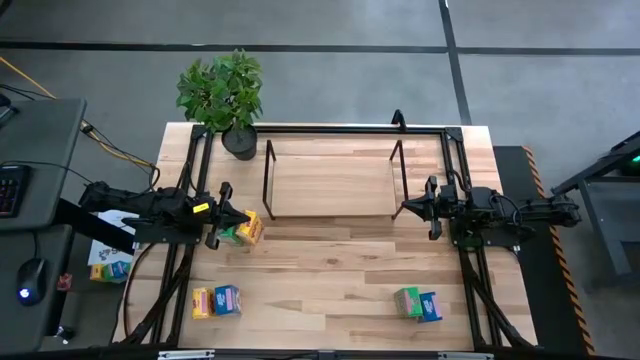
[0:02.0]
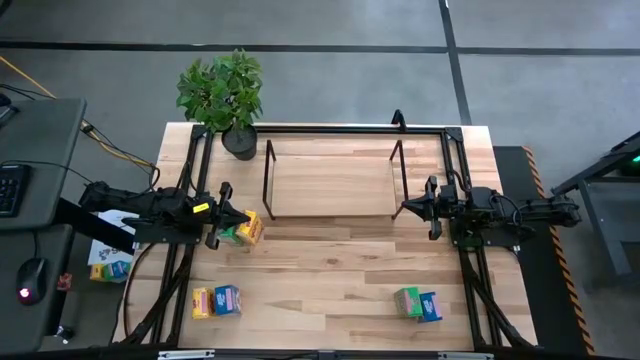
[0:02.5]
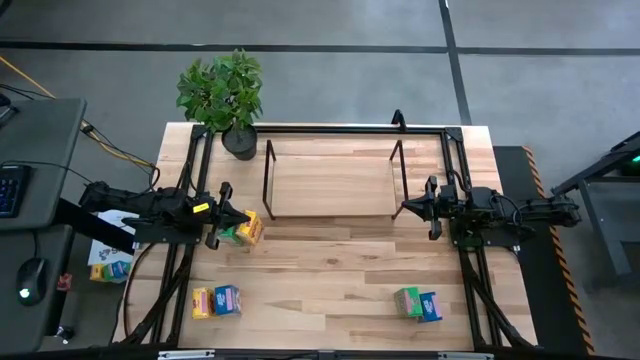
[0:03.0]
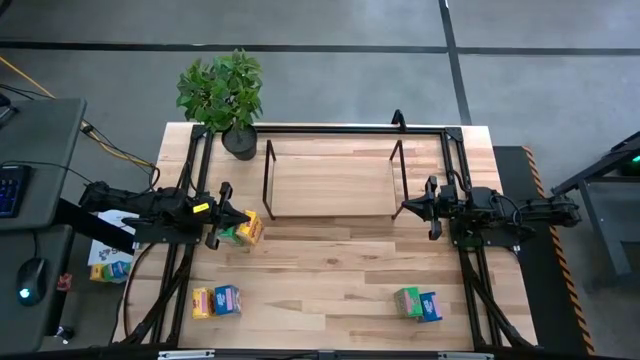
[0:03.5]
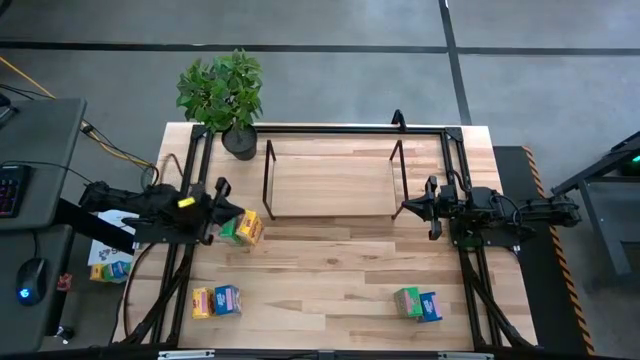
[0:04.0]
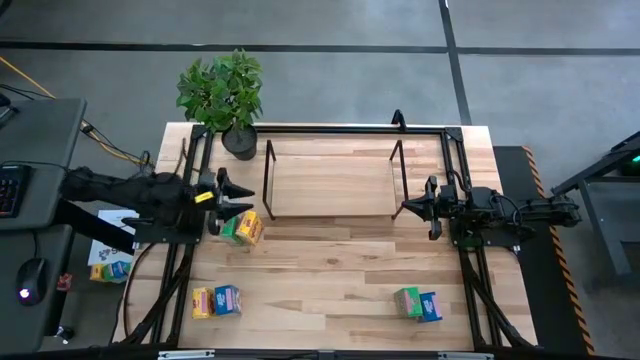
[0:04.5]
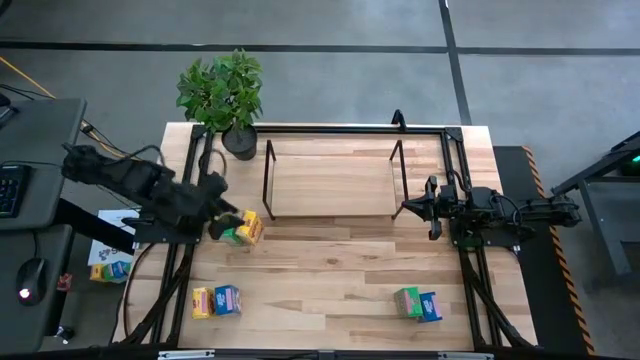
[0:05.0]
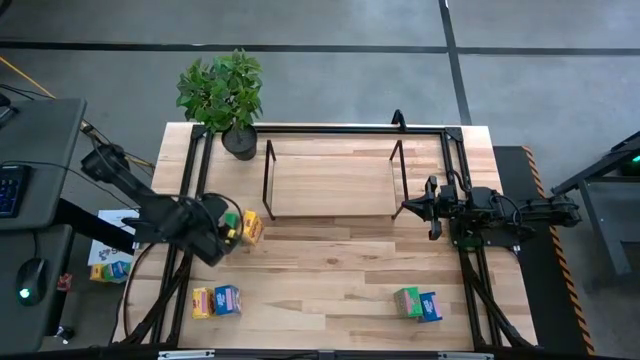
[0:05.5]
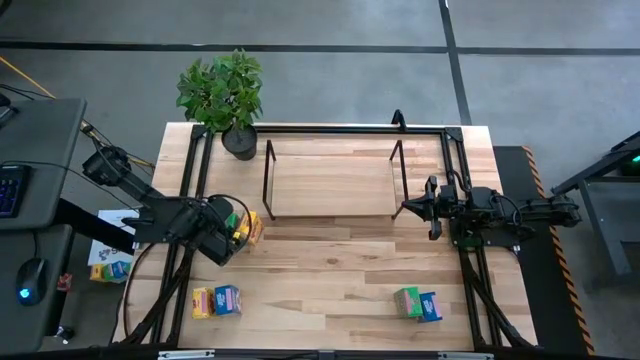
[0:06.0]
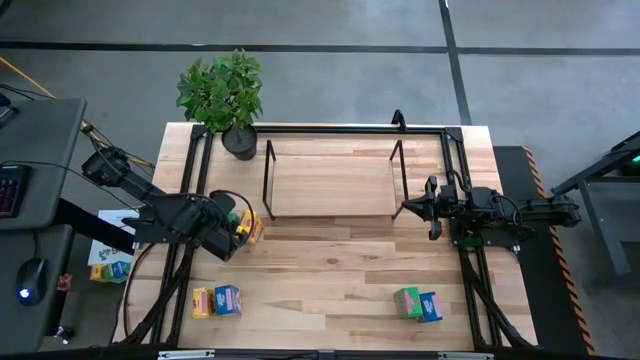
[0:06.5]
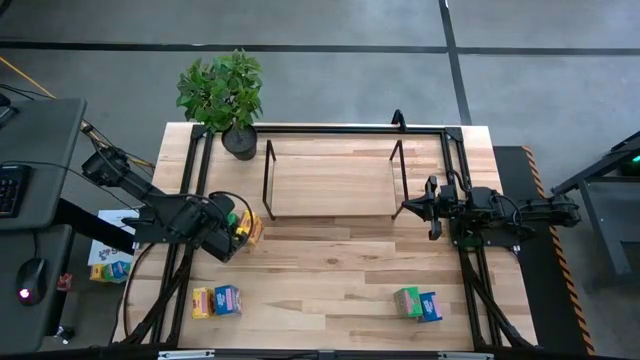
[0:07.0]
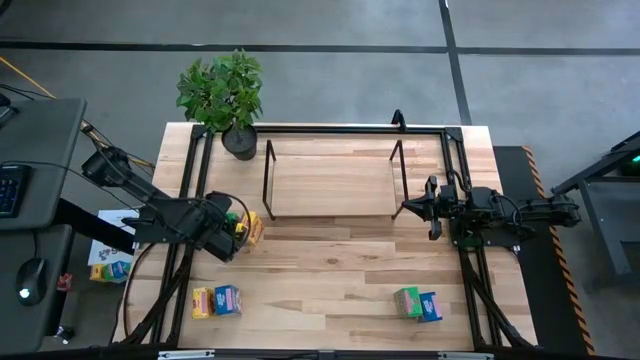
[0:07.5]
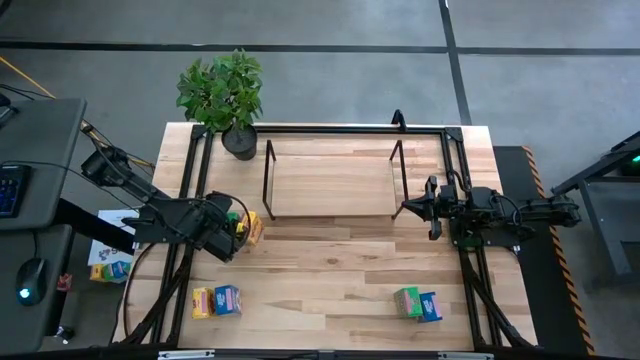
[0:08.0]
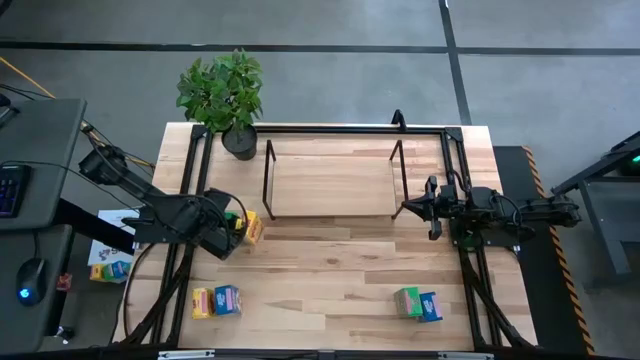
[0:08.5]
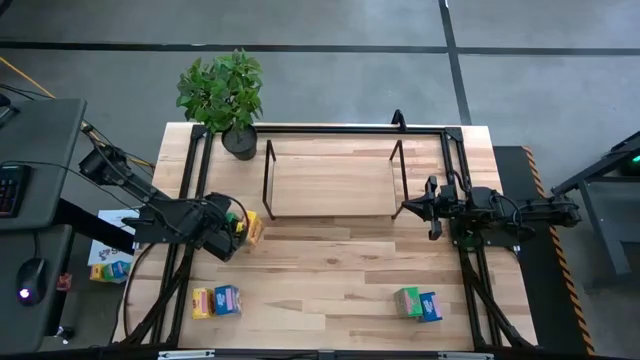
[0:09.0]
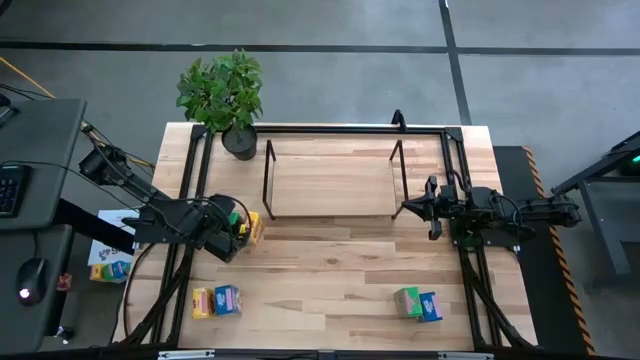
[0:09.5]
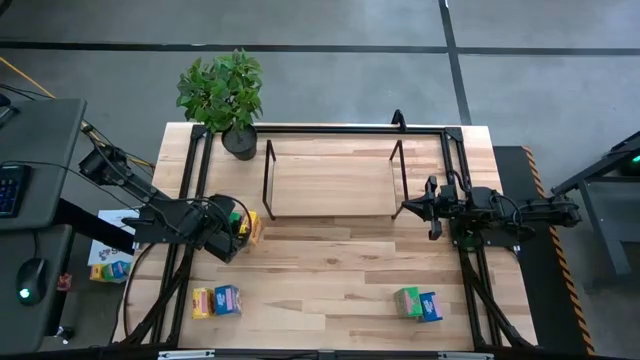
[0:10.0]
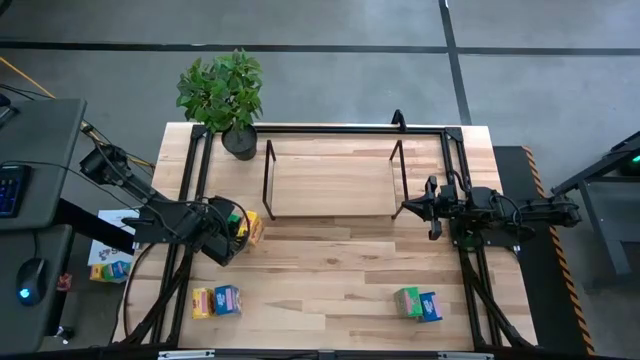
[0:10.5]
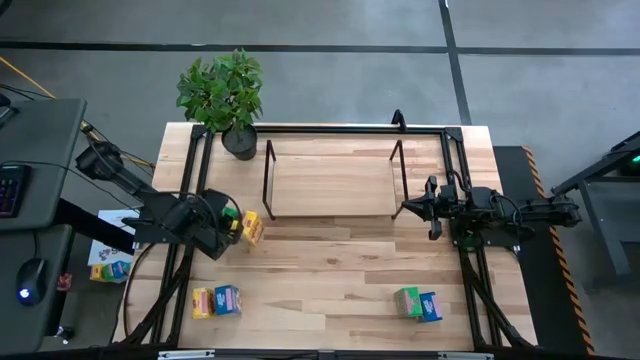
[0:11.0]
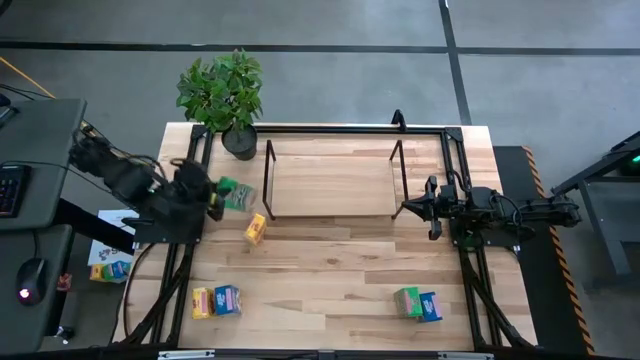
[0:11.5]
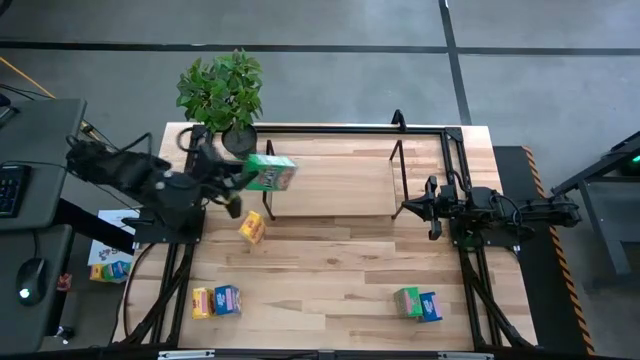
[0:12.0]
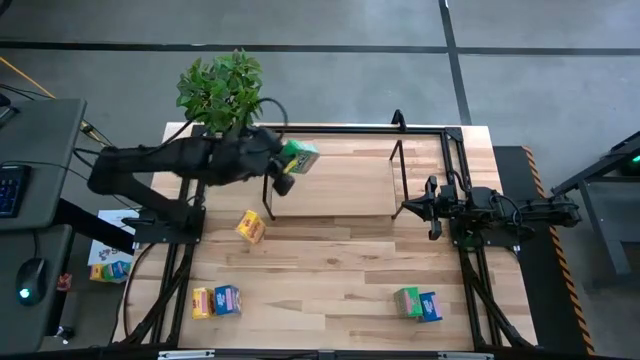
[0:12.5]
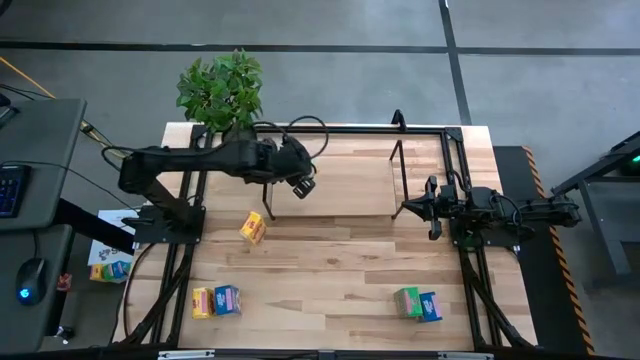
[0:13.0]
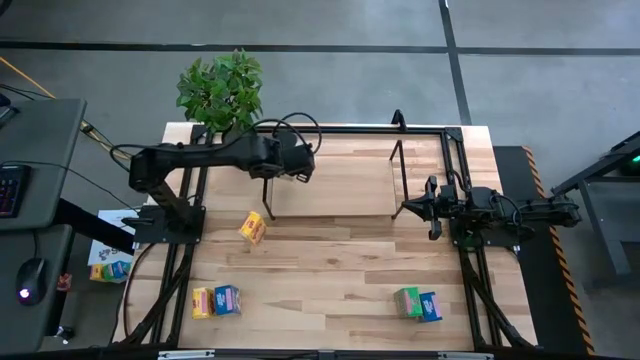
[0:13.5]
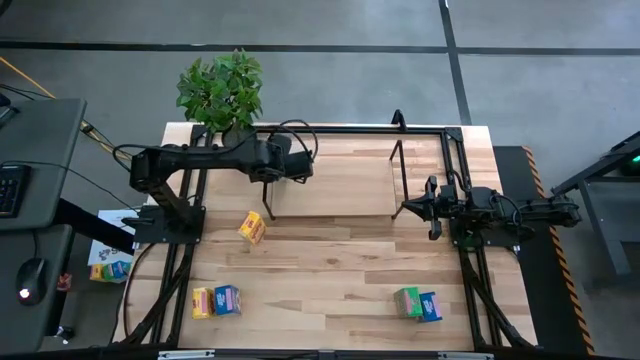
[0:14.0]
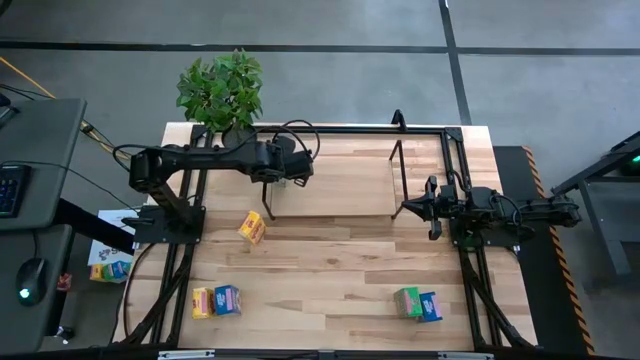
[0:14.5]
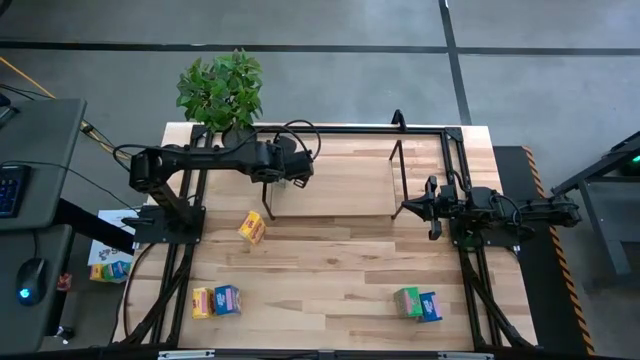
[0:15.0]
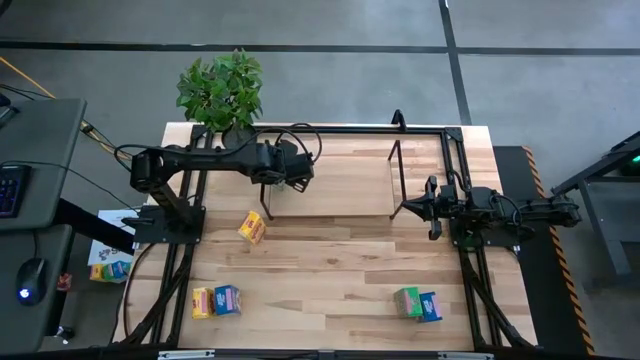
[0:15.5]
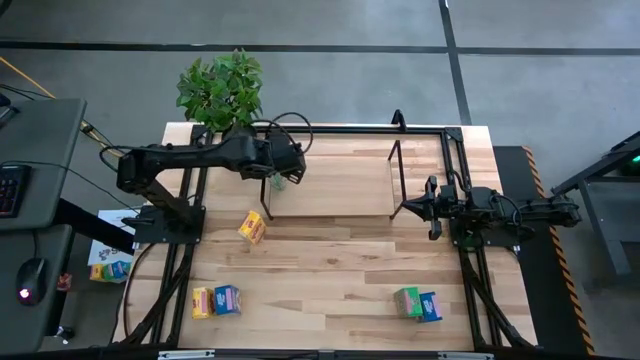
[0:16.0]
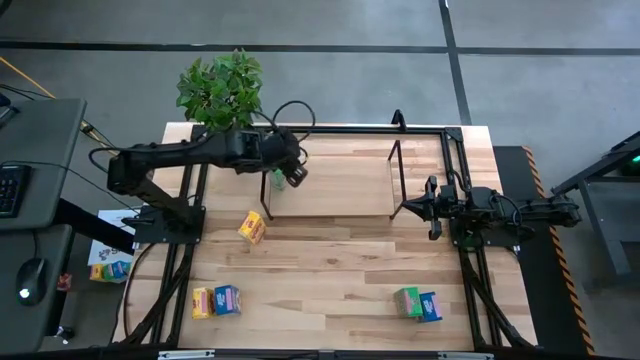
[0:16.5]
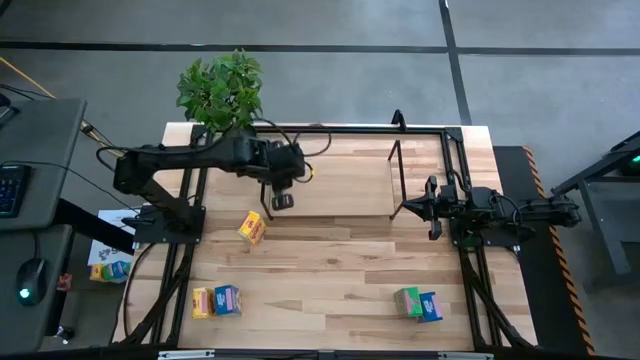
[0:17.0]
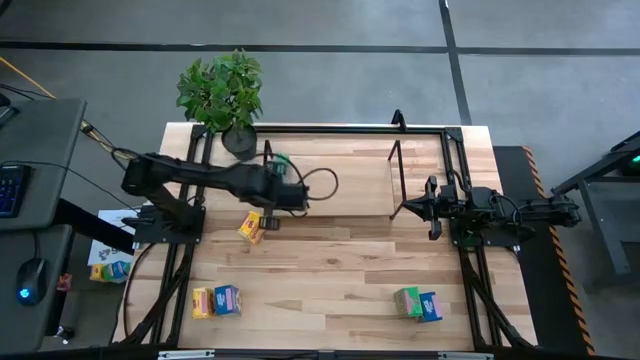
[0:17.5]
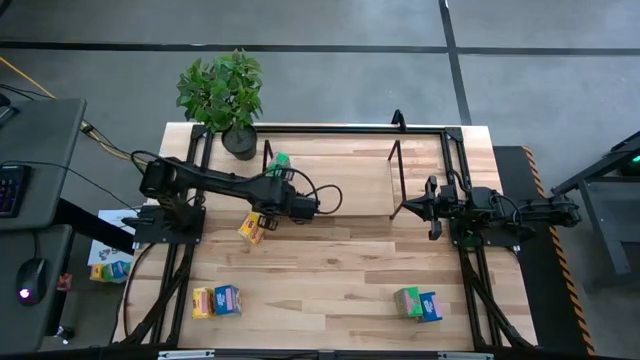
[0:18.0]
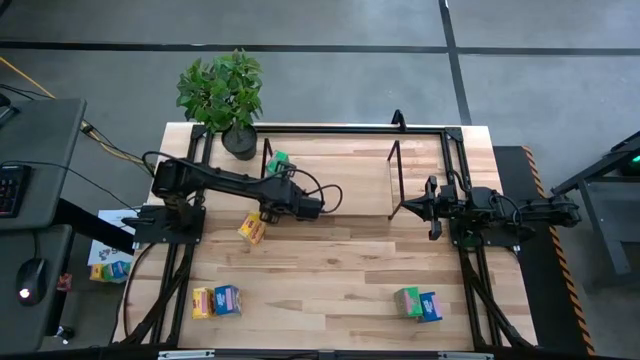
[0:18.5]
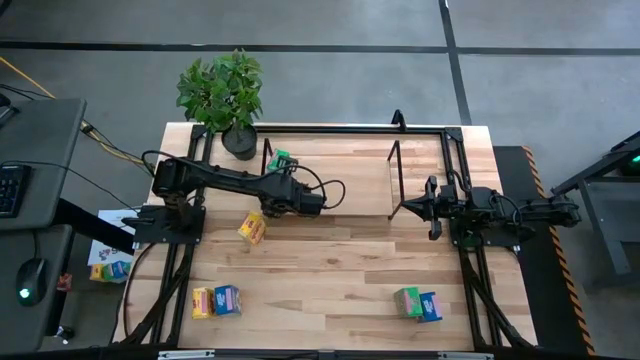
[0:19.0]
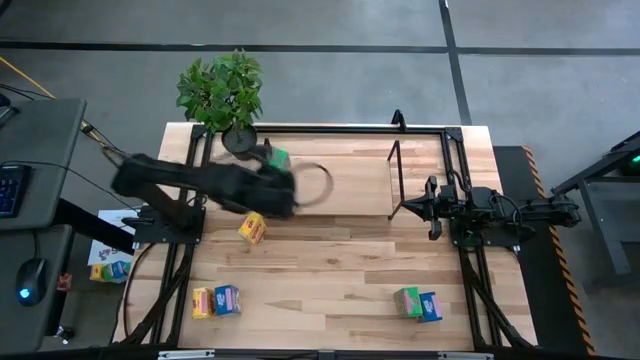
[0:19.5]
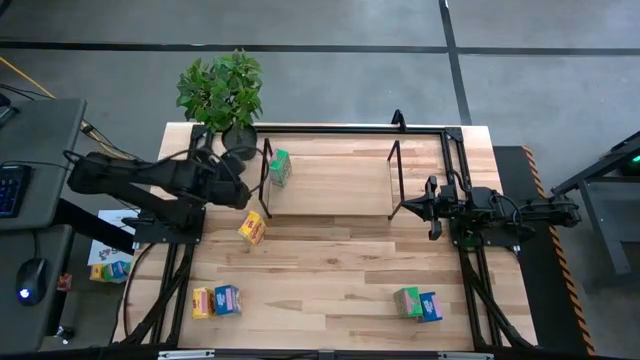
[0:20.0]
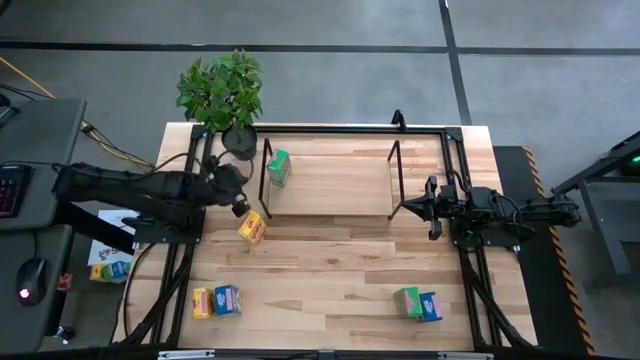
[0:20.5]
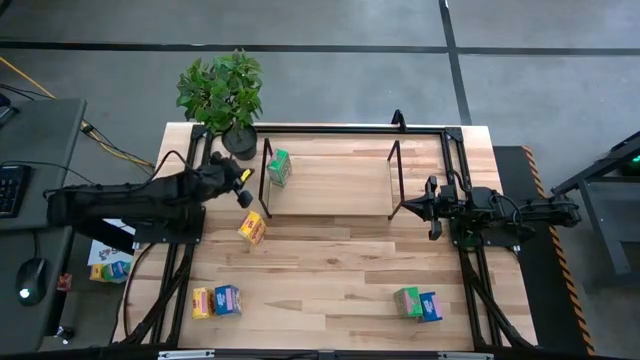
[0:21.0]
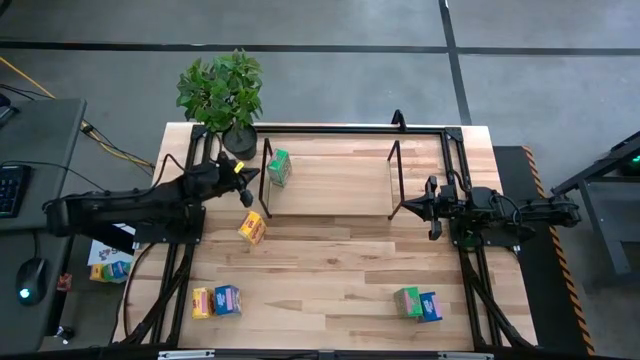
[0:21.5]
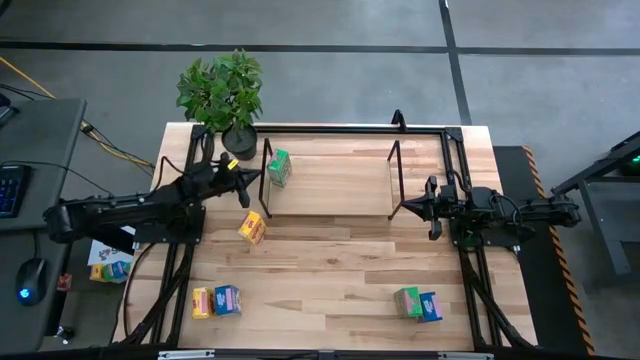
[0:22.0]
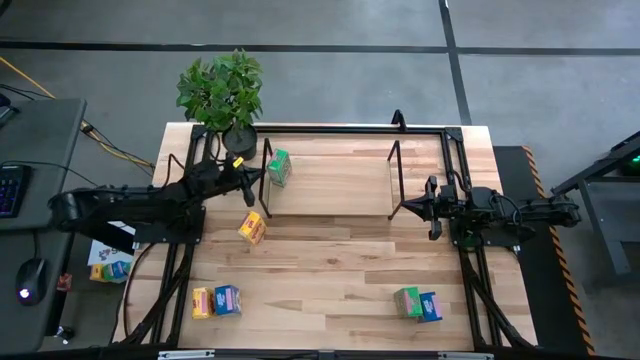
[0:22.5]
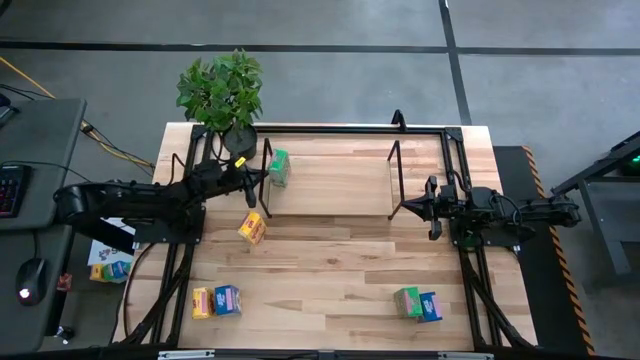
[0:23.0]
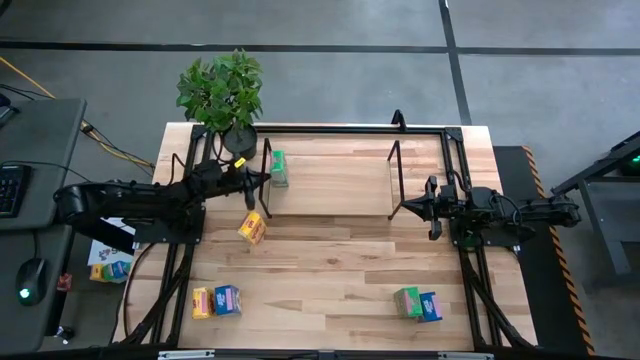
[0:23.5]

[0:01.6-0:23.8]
Task: Stack cereal on shelf
Put the top green cereal box on the shelf
